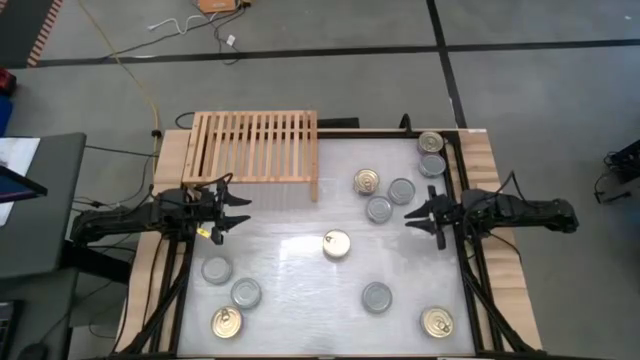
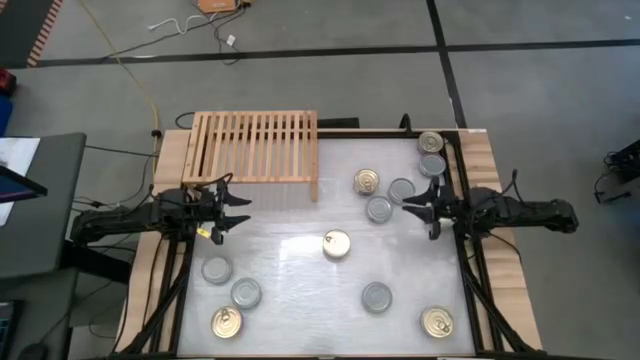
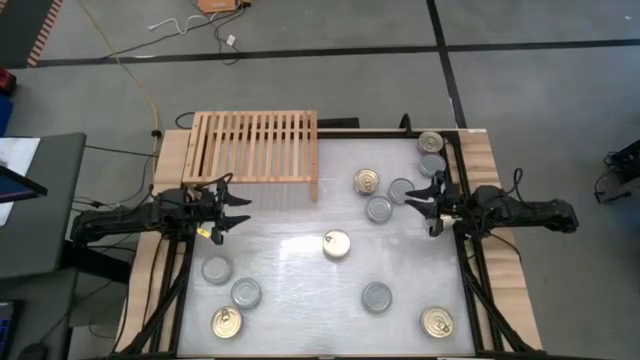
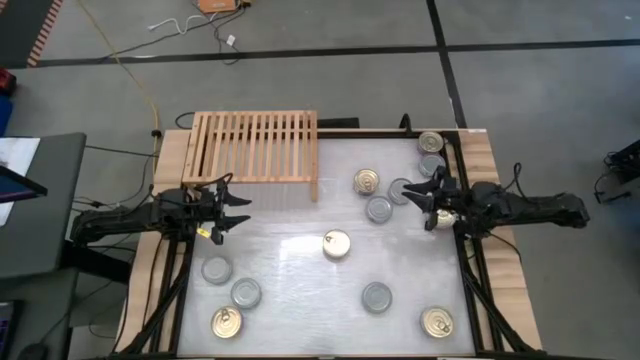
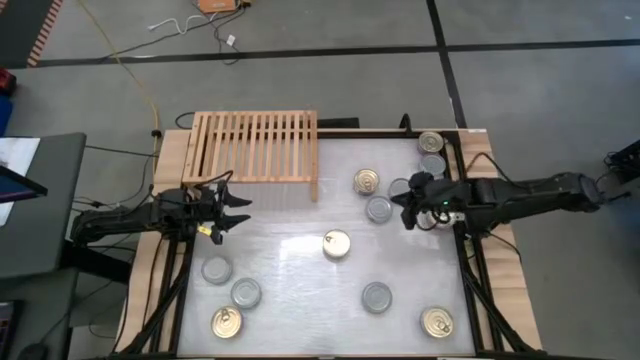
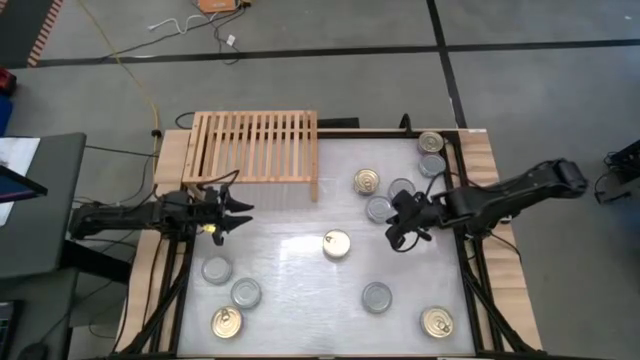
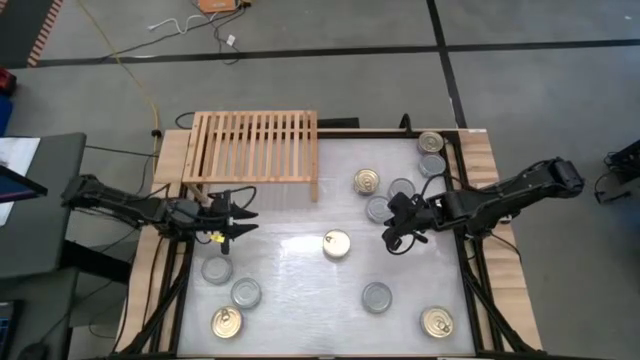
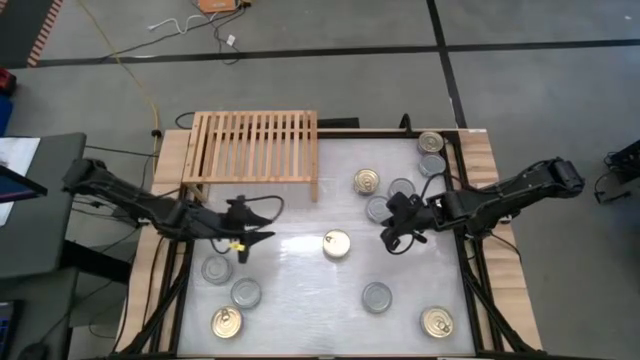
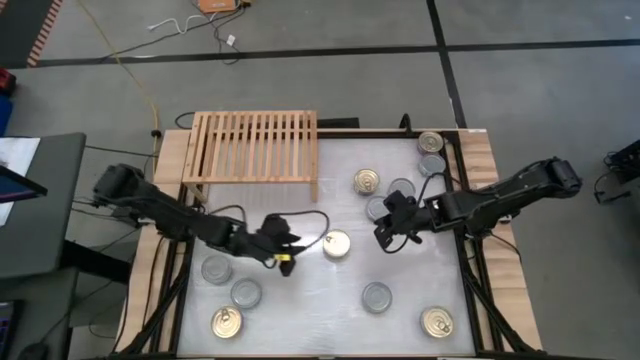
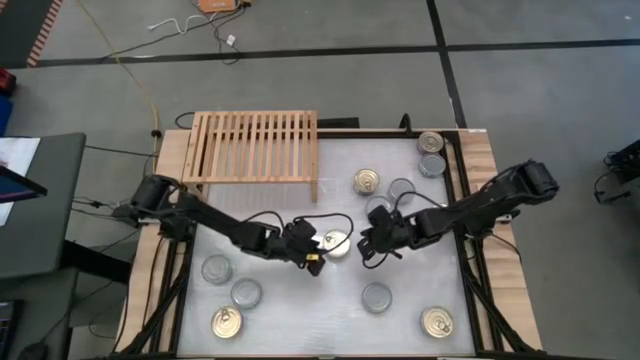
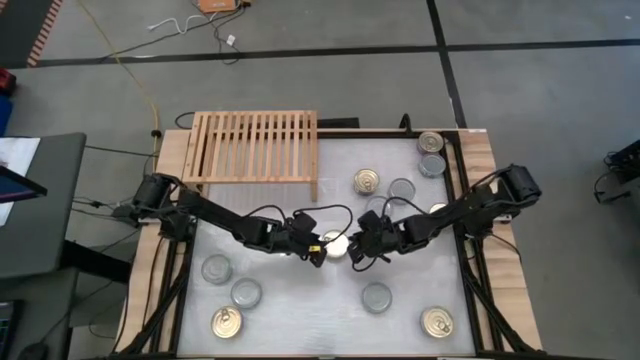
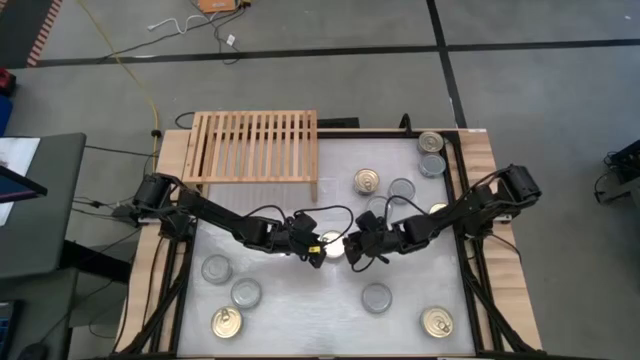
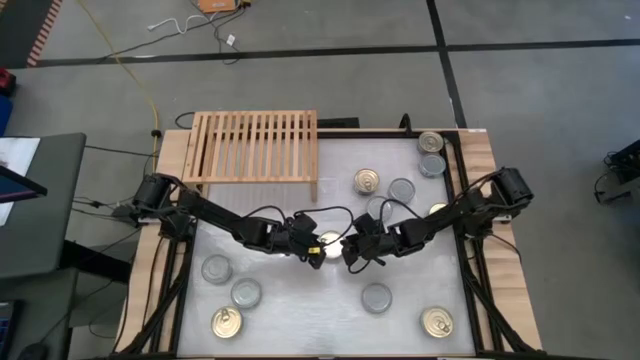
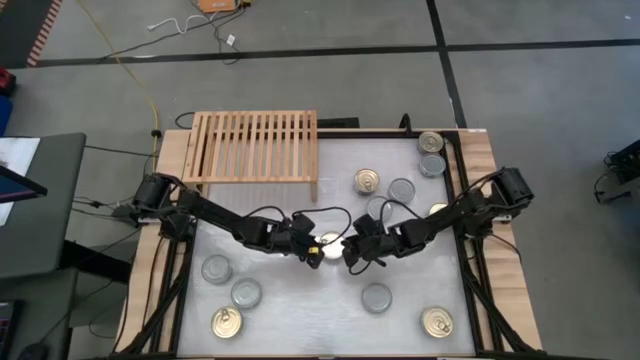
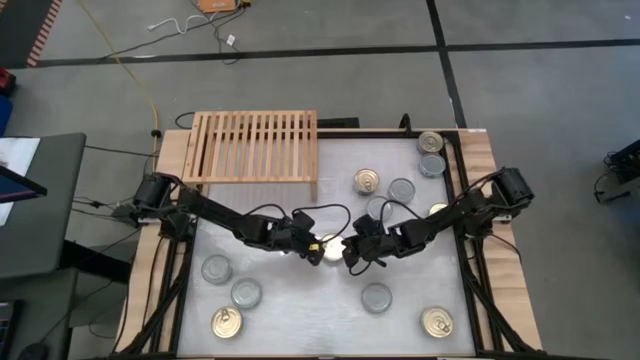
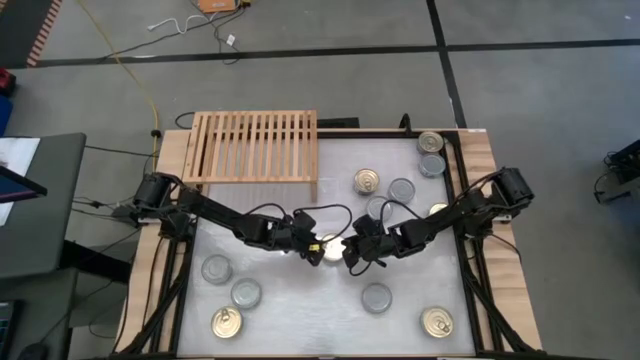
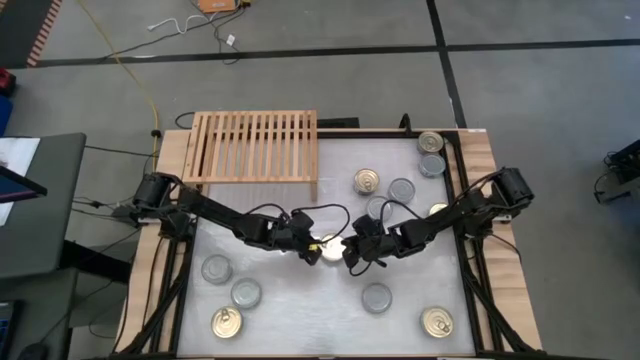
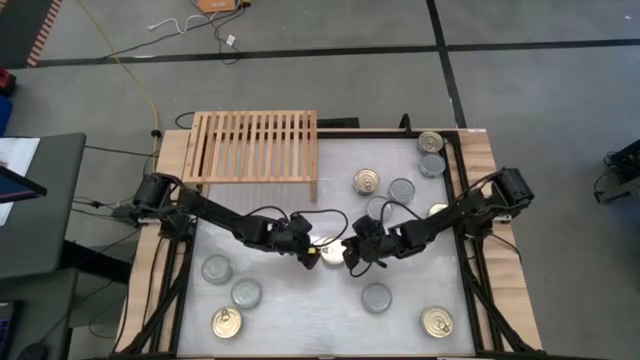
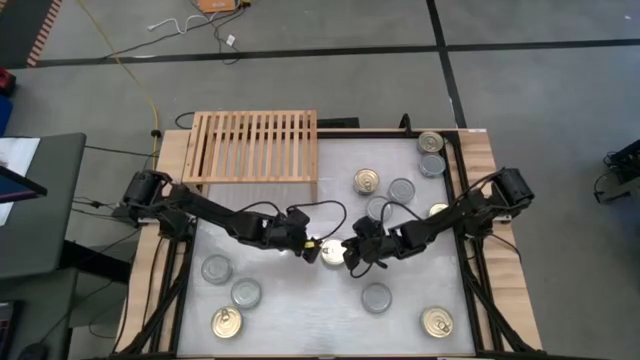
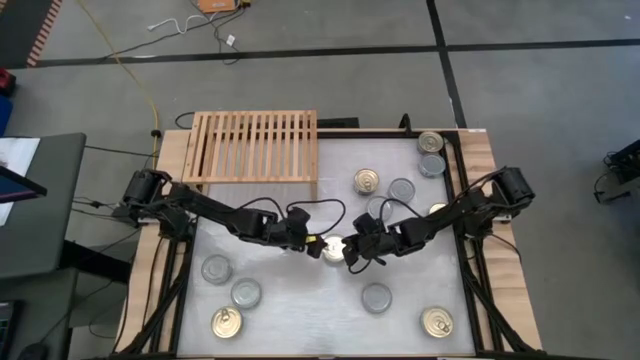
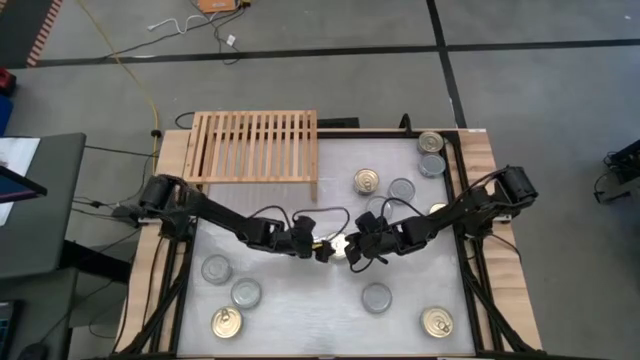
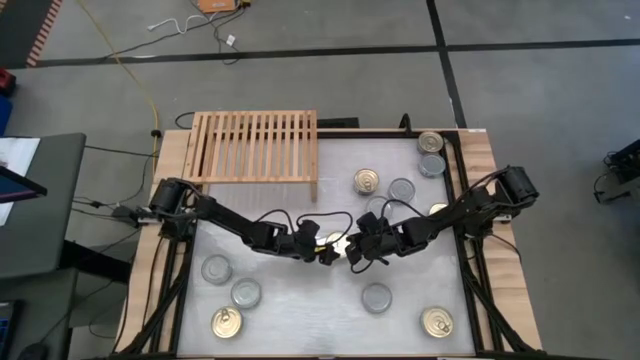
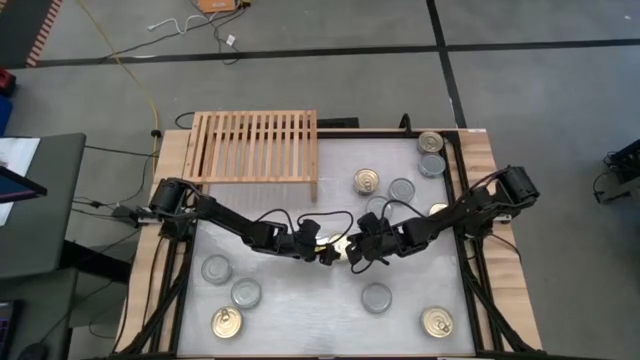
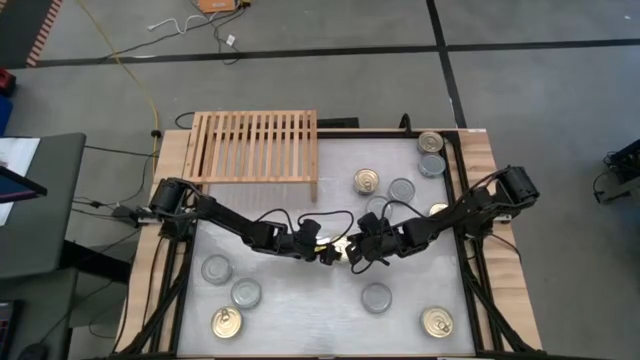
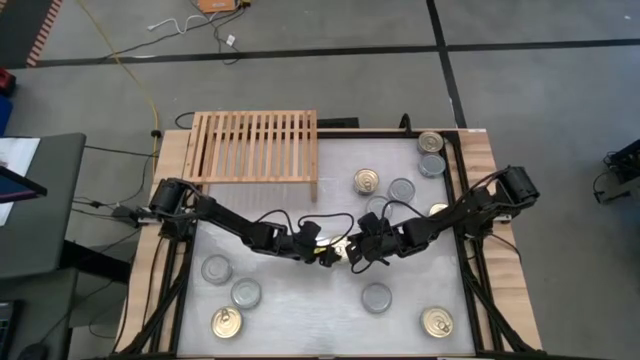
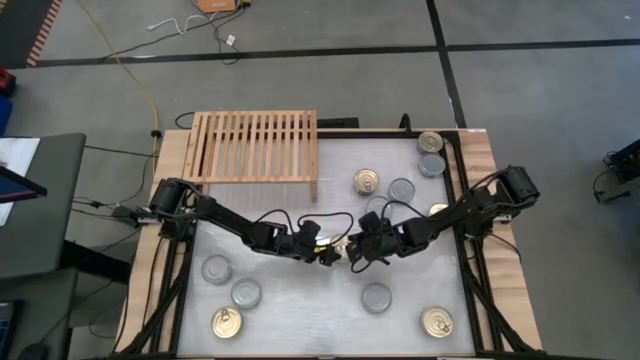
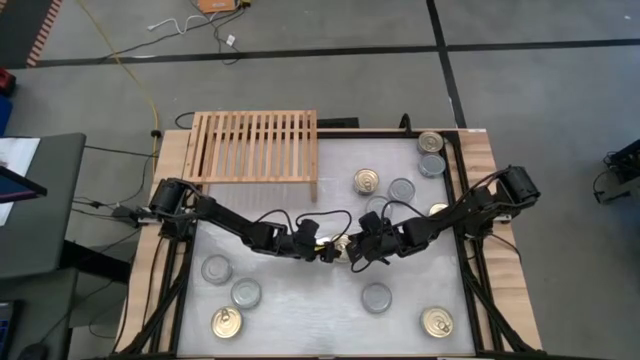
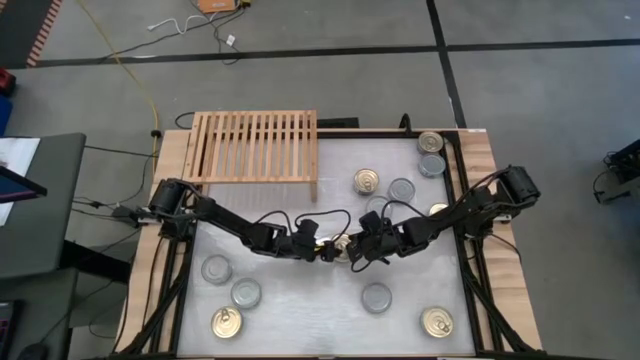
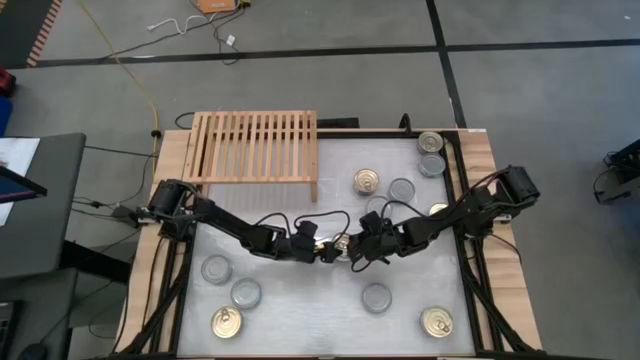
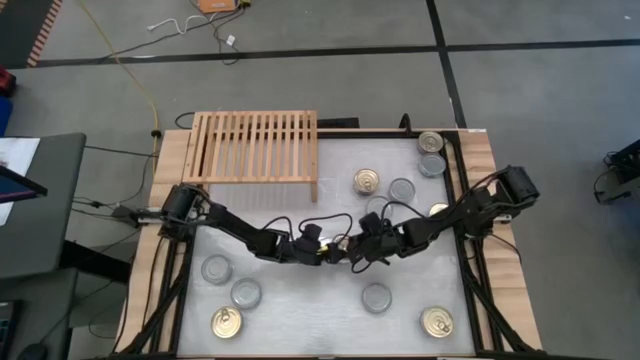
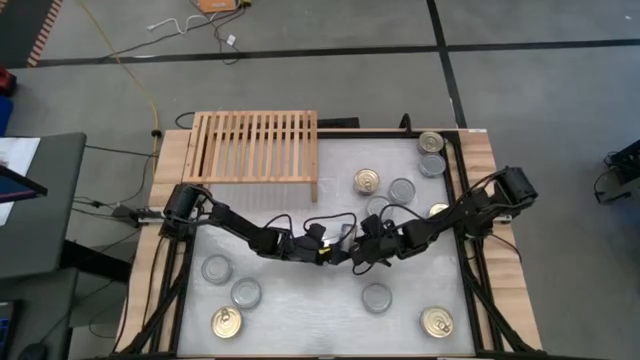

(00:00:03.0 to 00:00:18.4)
Task: Stack canned seafood by type on shelf
Put the blue tuna can on the shelf

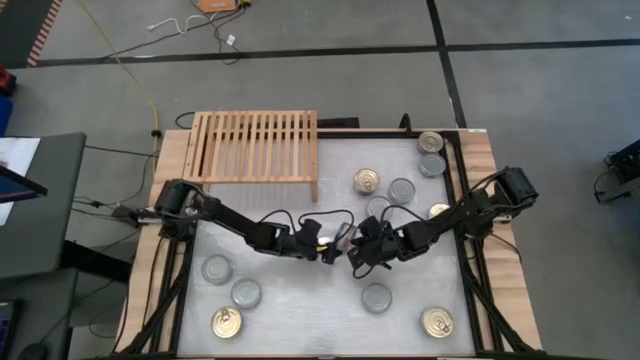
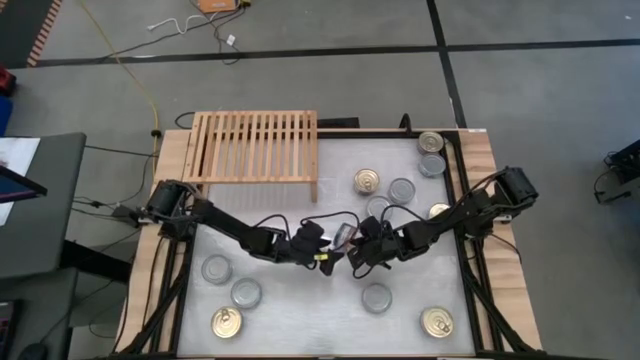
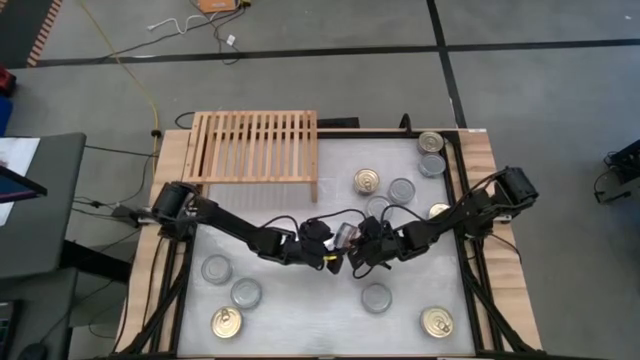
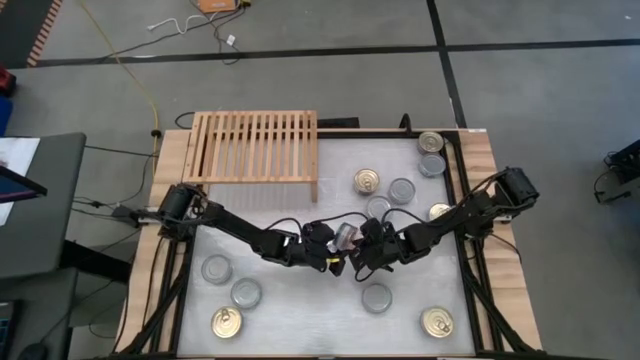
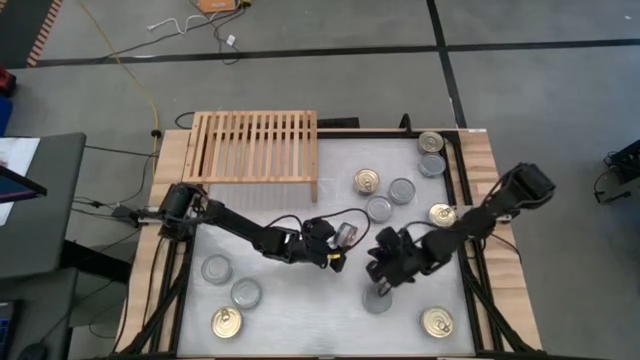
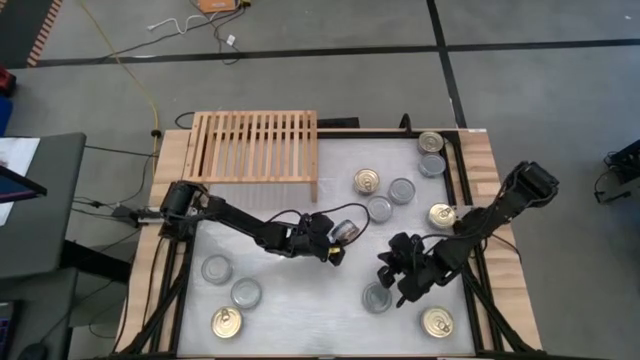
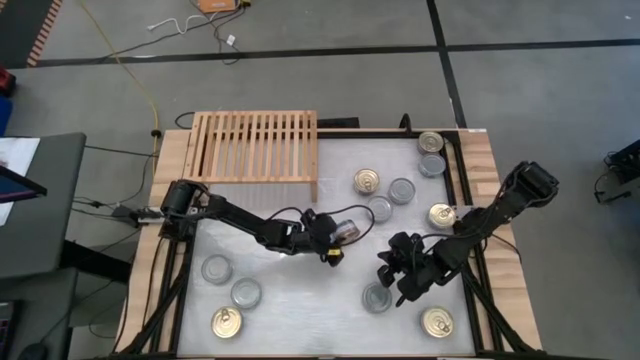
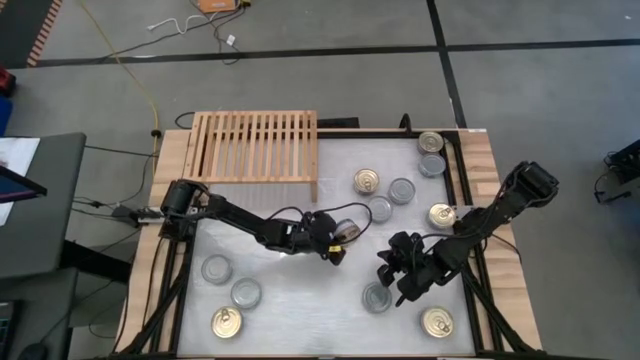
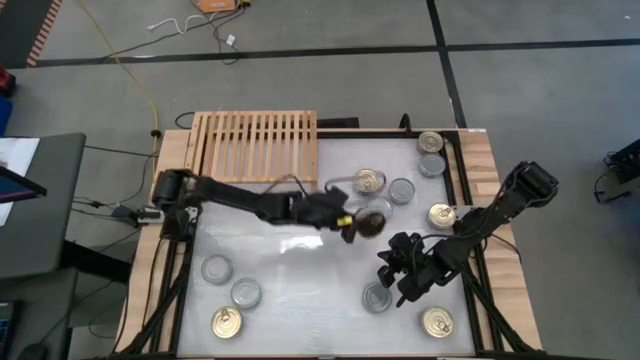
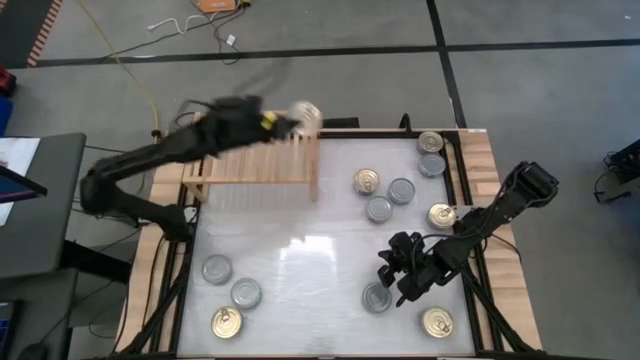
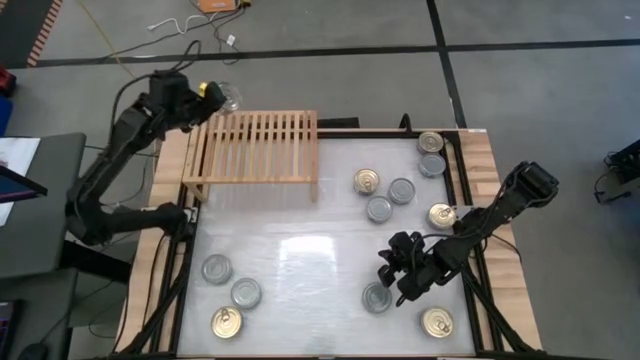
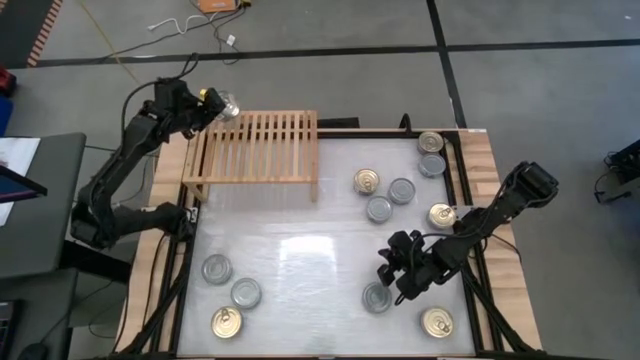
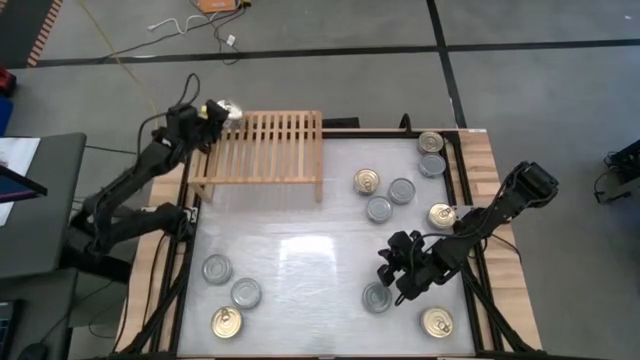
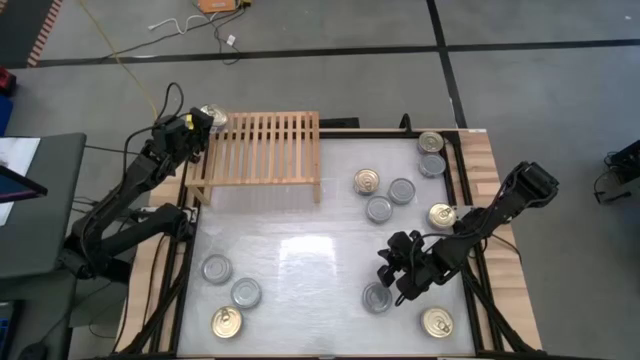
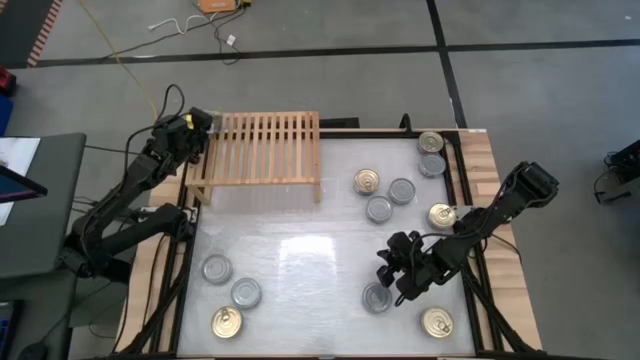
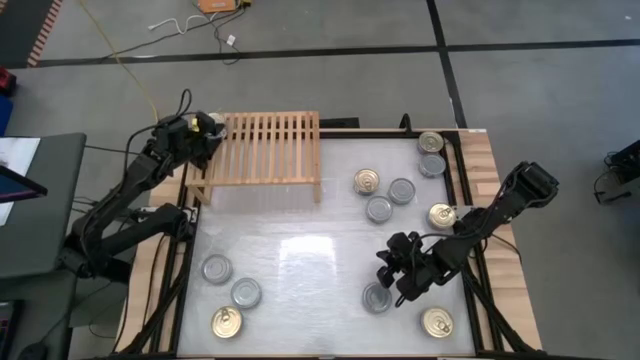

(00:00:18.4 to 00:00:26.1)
Put the blue tuna can on the shelf
